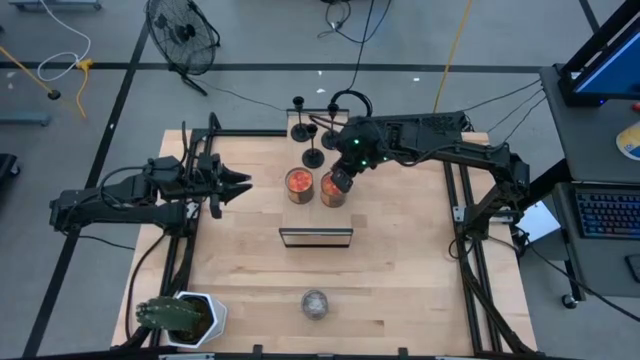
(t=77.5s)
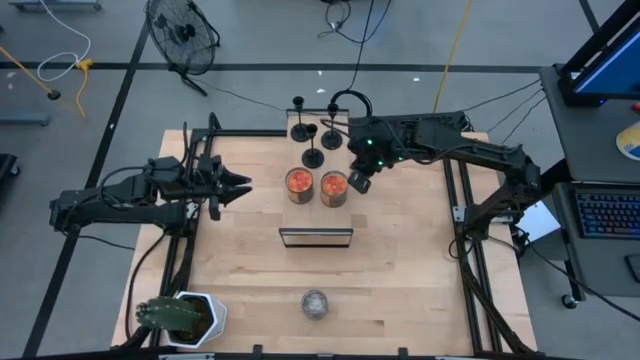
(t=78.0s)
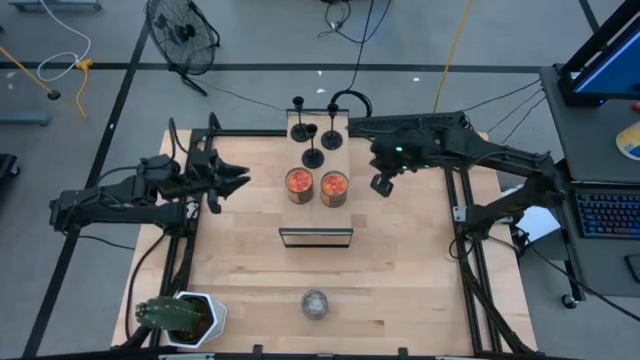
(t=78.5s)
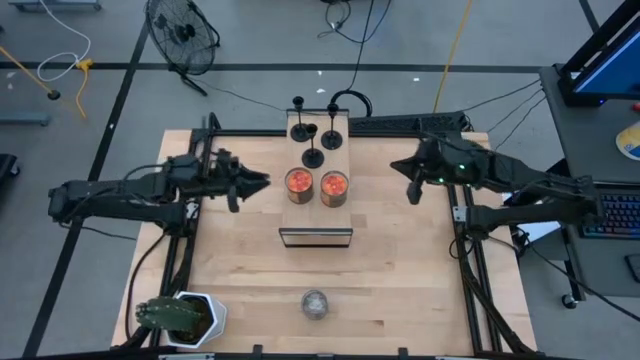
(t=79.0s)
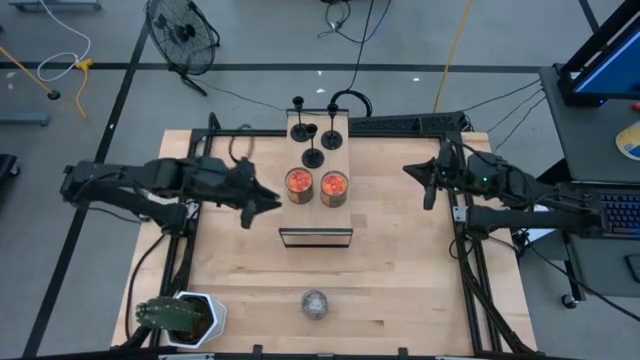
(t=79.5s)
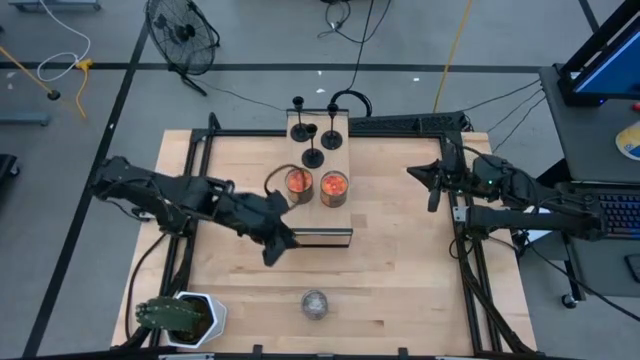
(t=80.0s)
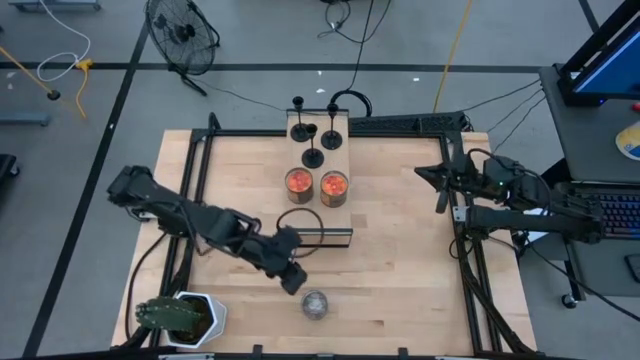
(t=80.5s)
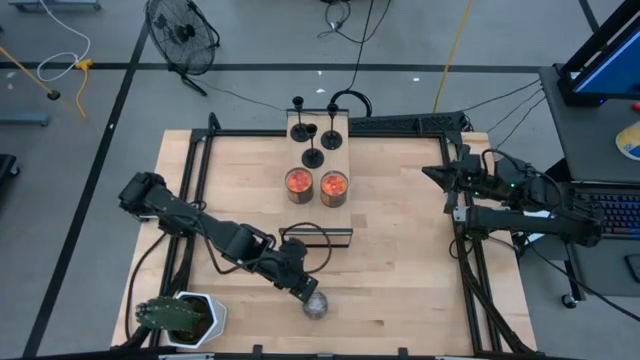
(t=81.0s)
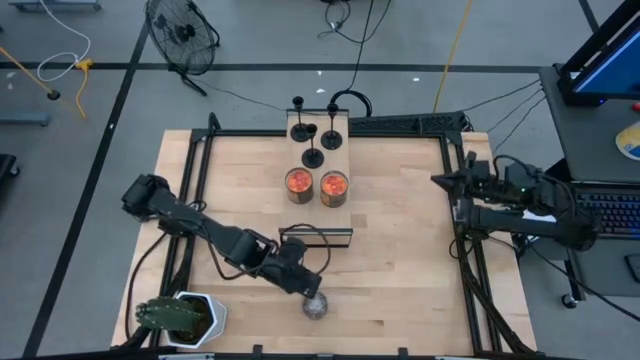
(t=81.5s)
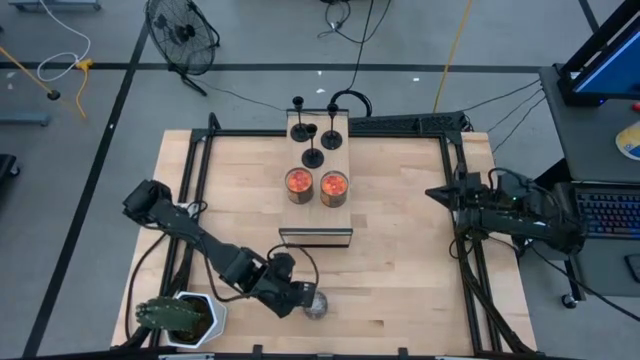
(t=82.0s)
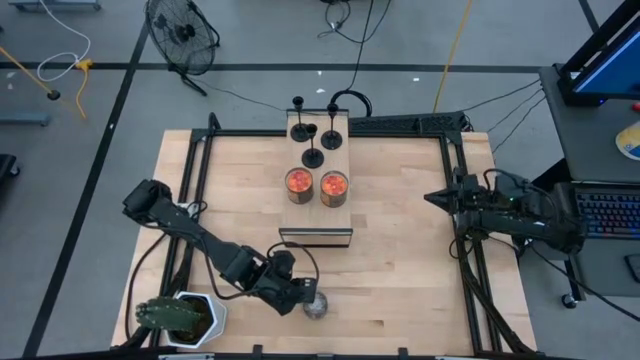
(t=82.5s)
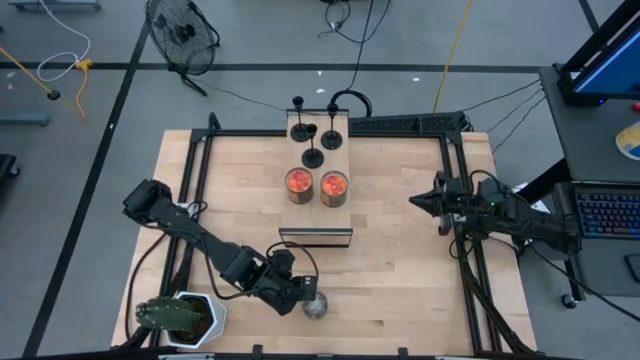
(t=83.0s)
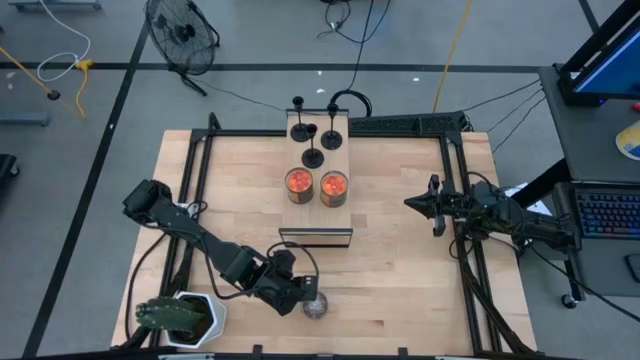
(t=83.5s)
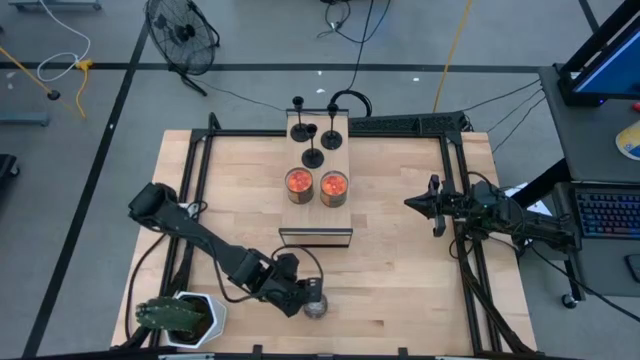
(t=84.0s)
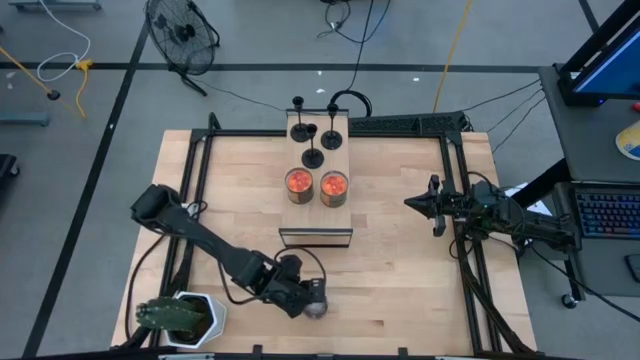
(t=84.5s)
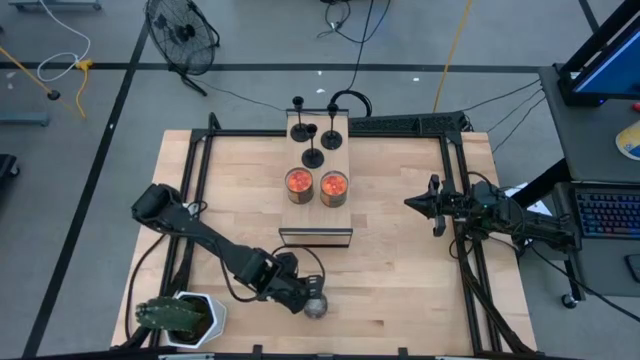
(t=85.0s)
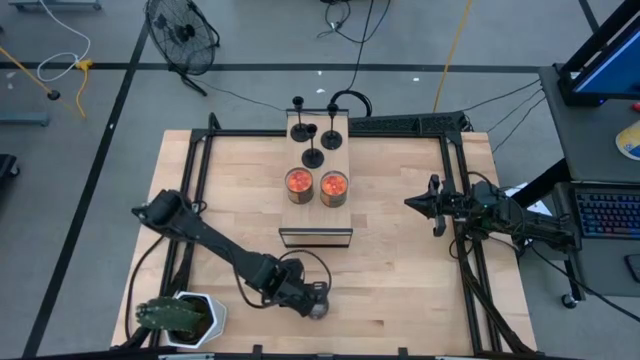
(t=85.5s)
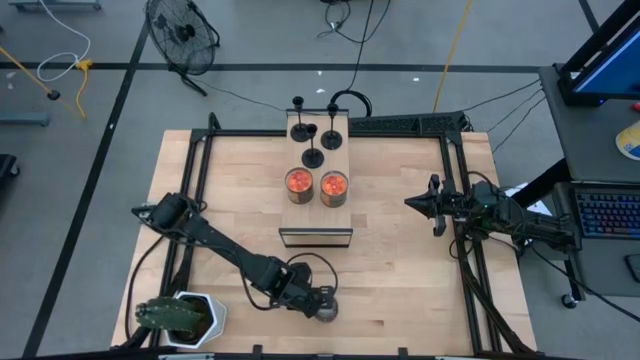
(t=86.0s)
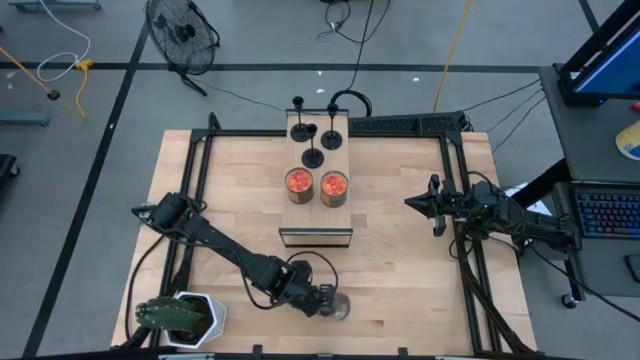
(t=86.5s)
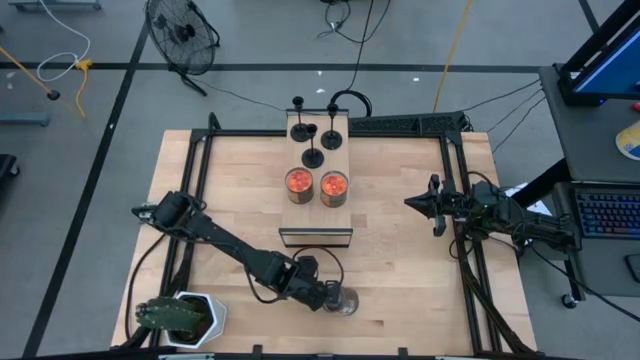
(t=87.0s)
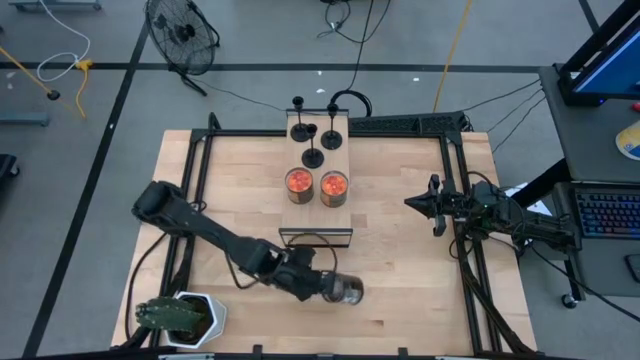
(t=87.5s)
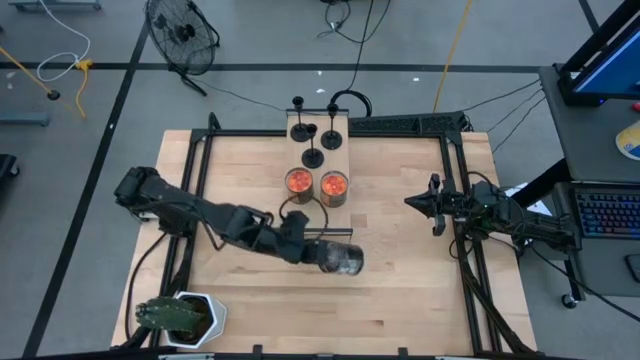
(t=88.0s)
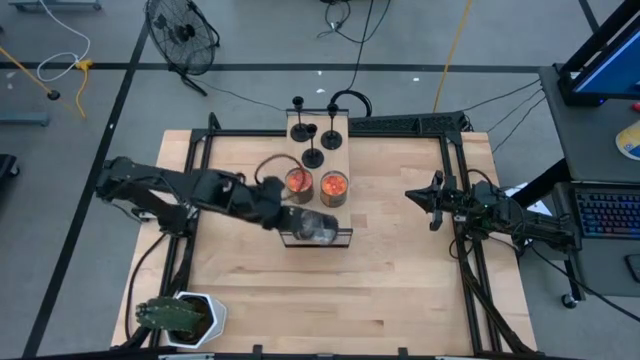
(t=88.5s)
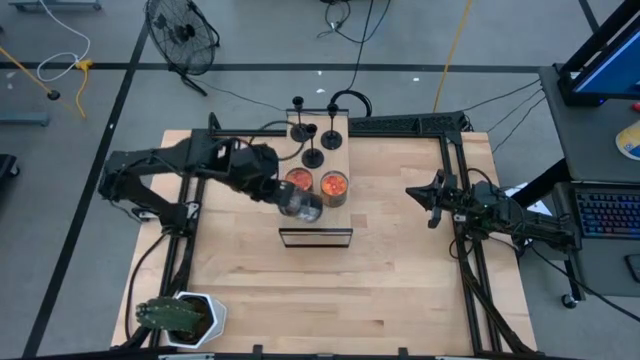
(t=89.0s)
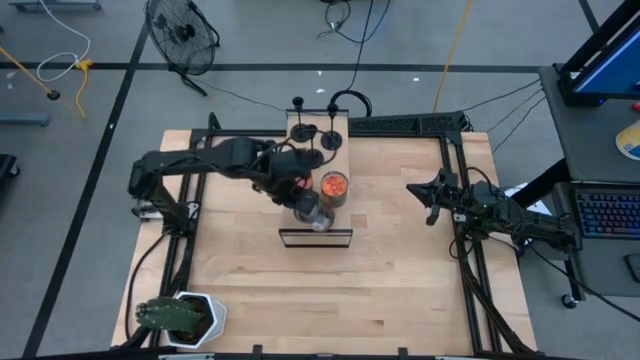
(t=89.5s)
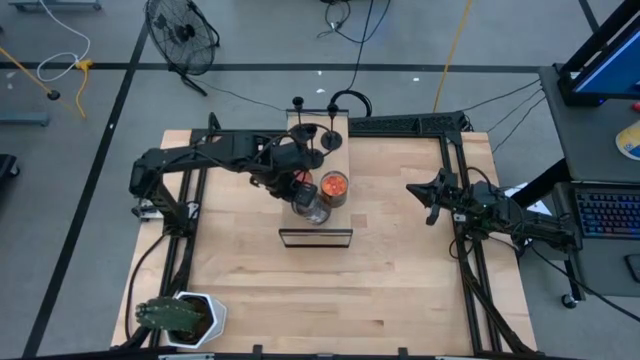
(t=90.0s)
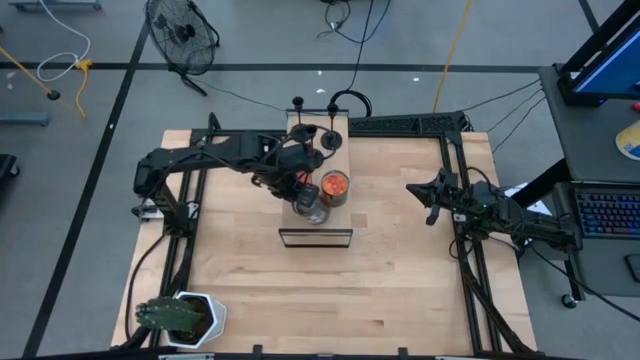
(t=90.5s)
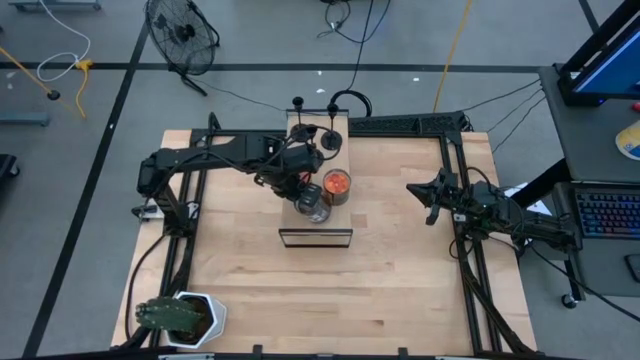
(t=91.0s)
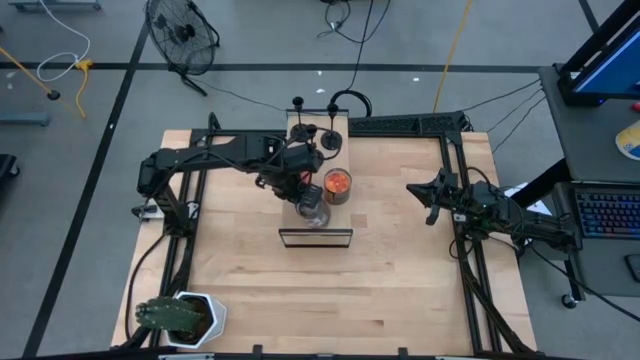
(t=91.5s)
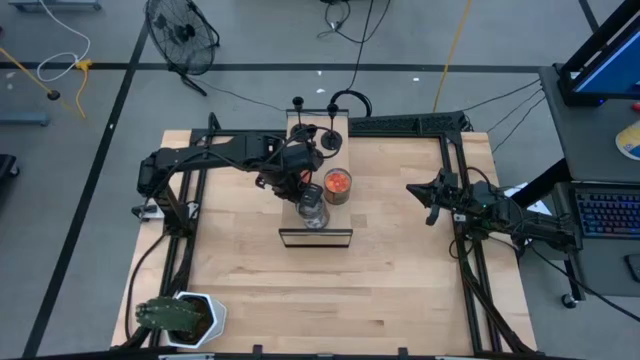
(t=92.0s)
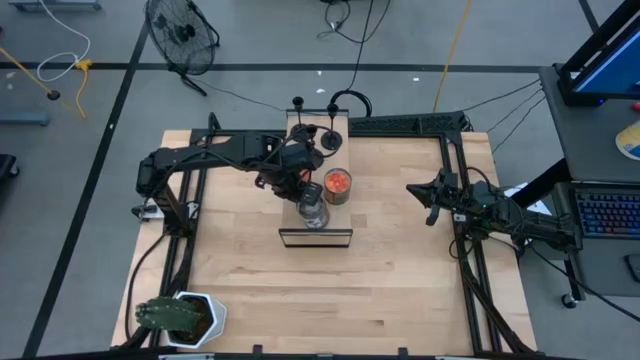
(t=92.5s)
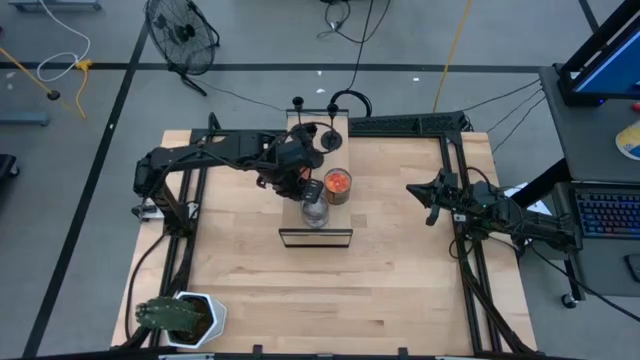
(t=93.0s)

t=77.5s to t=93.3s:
Task: Pick & Place candle stick holders
Put the candle on the shelf

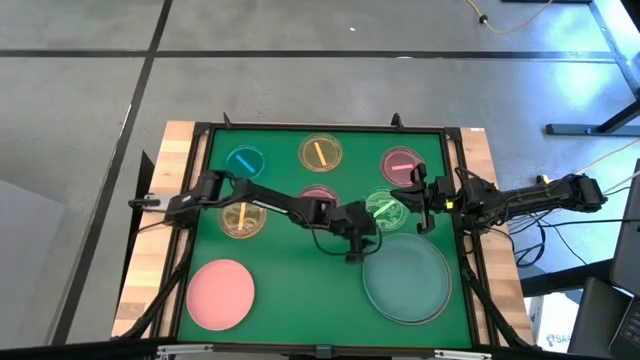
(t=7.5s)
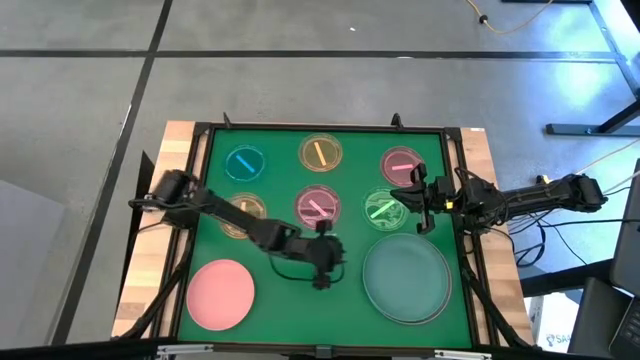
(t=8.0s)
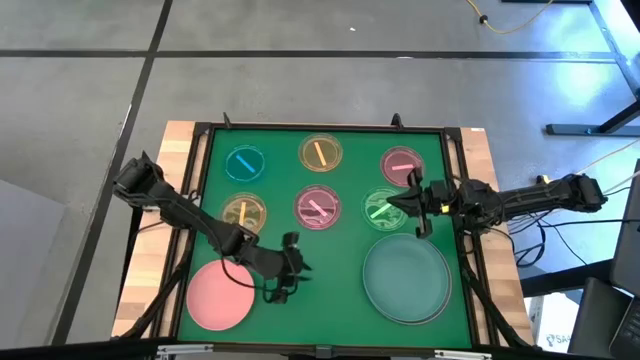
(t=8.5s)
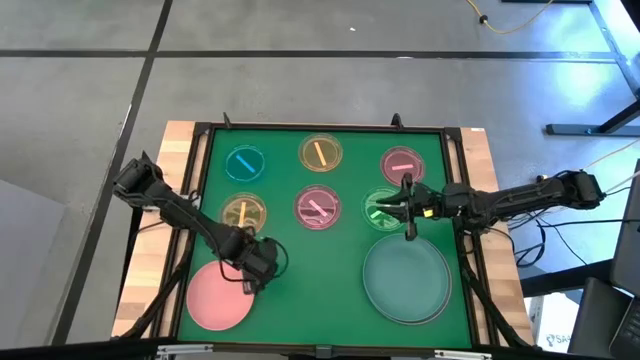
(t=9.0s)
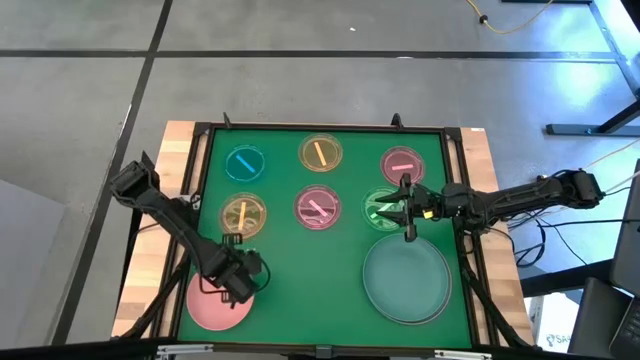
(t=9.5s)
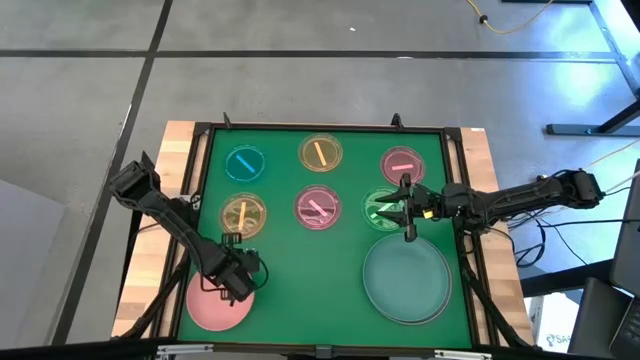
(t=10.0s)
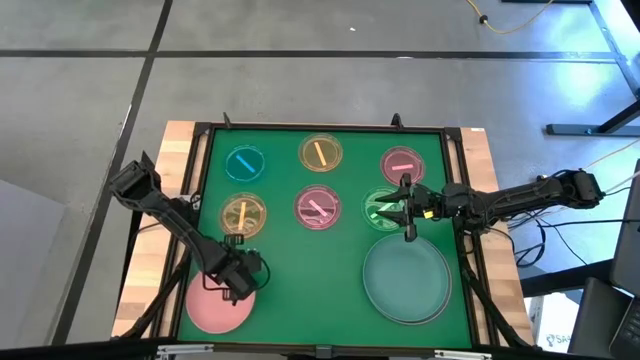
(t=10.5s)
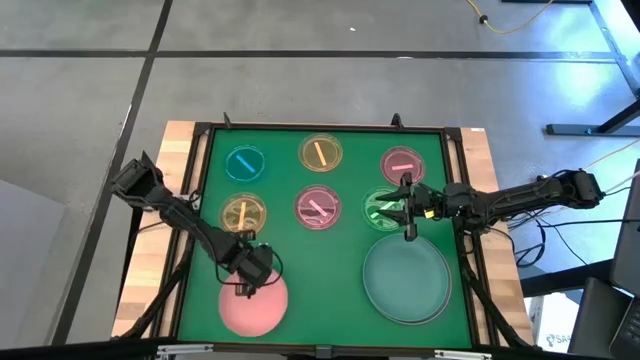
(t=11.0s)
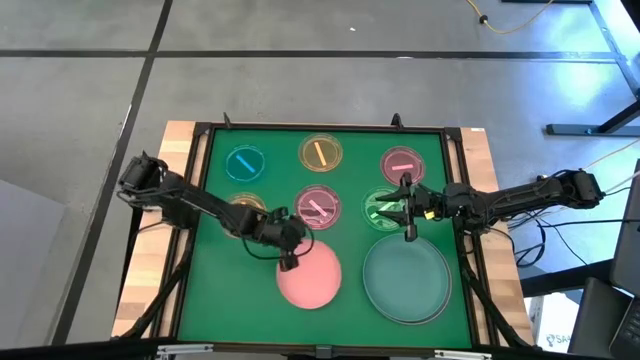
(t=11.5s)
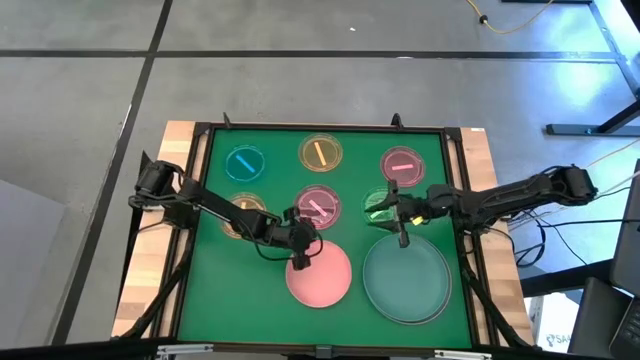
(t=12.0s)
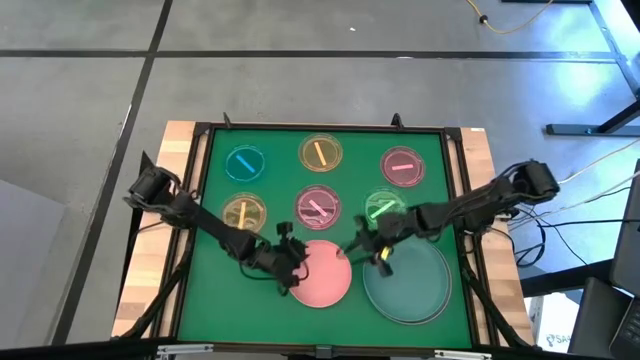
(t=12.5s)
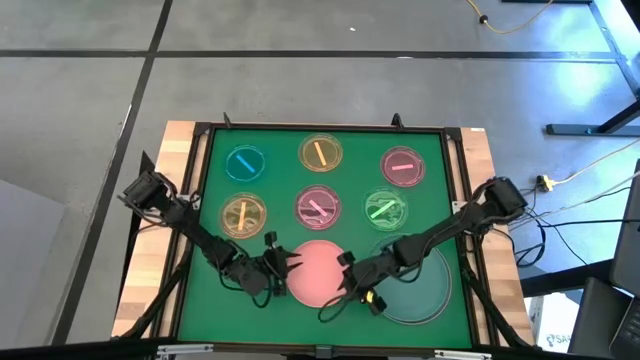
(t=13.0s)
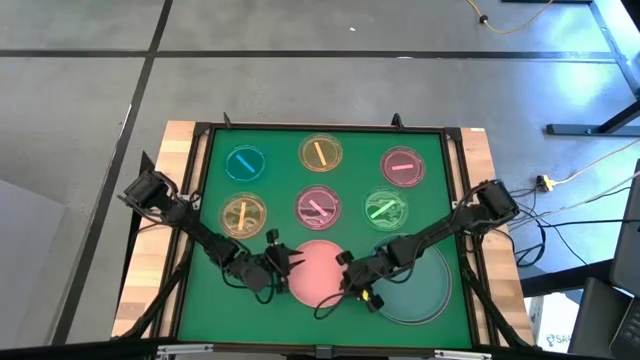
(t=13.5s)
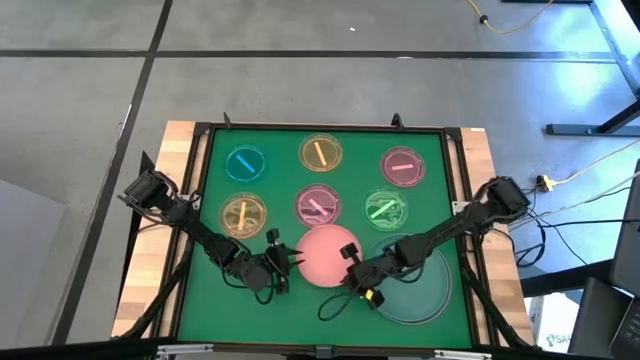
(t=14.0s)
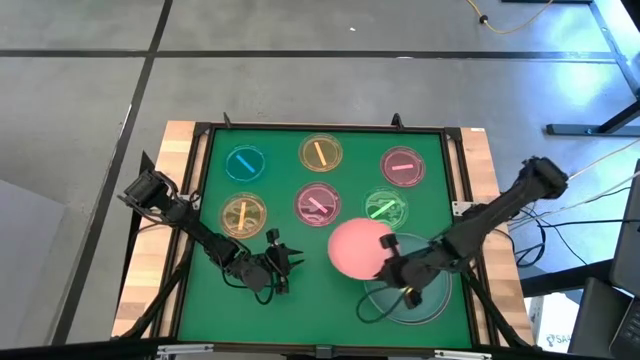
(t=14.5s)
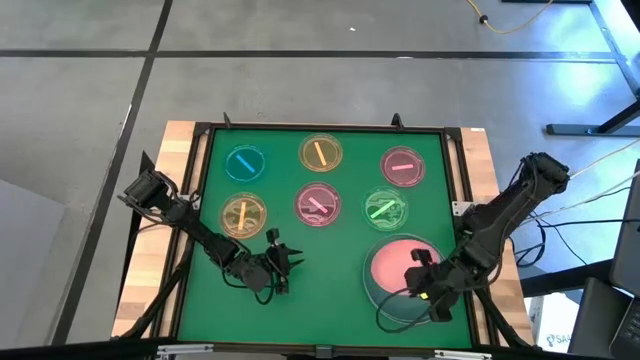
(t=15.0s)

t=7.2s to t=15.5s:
Task: Stack plastic plates
Stack the light pink plate on top of the light blue plate
